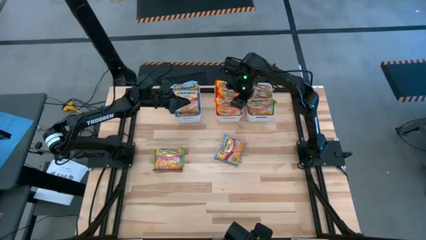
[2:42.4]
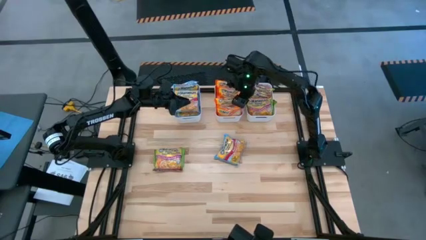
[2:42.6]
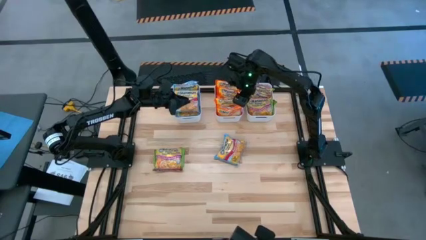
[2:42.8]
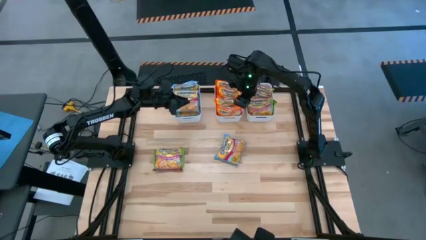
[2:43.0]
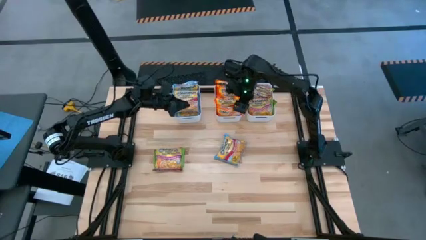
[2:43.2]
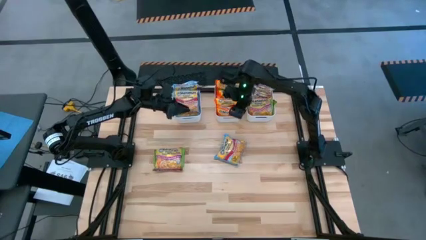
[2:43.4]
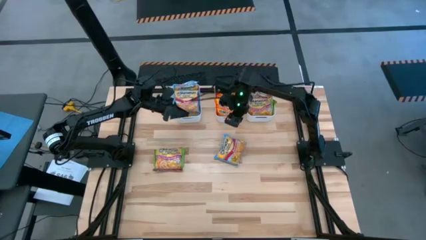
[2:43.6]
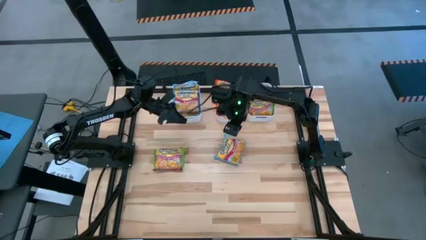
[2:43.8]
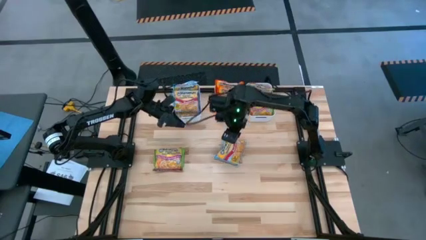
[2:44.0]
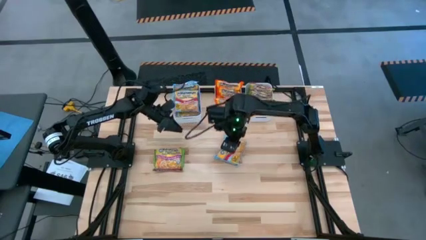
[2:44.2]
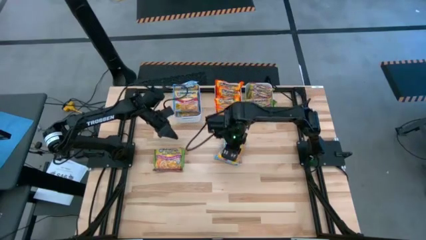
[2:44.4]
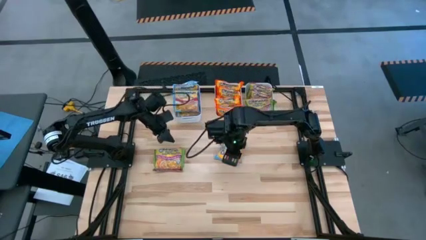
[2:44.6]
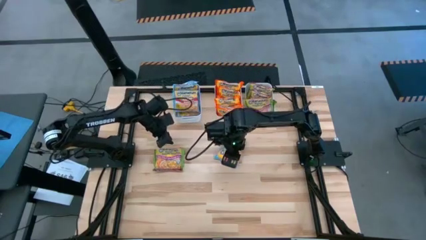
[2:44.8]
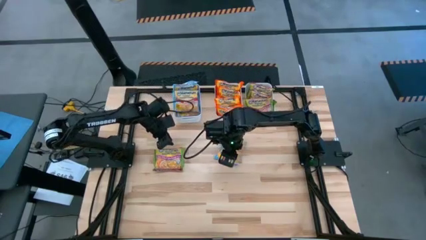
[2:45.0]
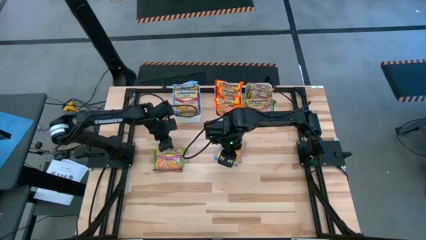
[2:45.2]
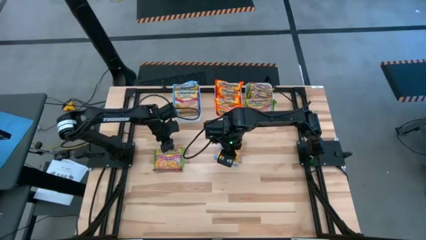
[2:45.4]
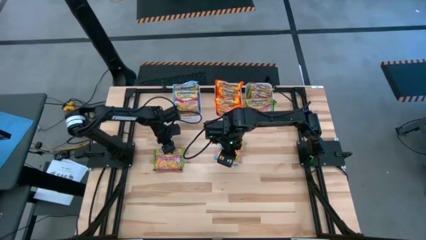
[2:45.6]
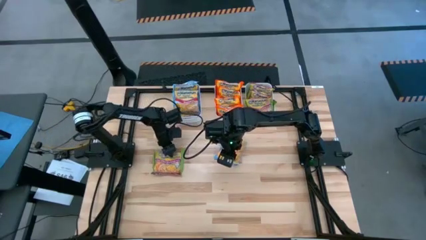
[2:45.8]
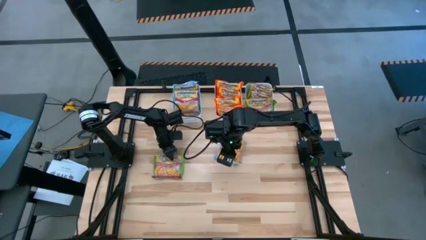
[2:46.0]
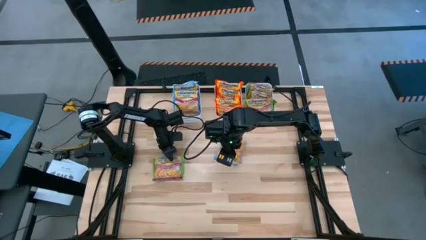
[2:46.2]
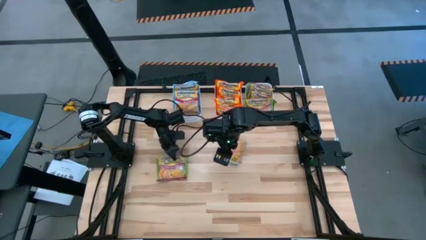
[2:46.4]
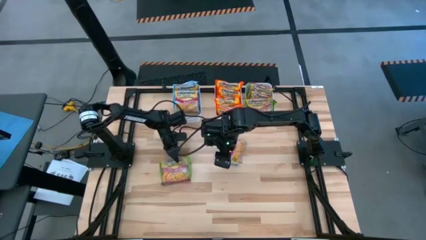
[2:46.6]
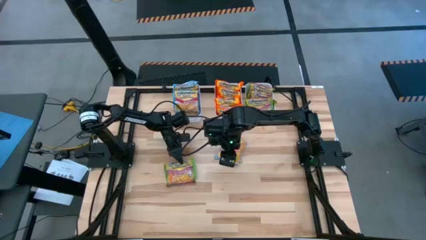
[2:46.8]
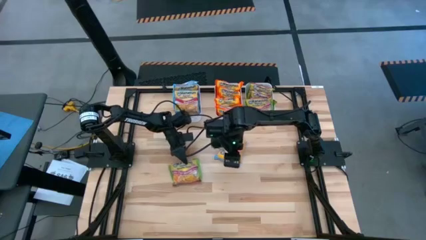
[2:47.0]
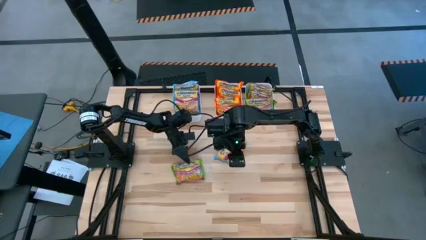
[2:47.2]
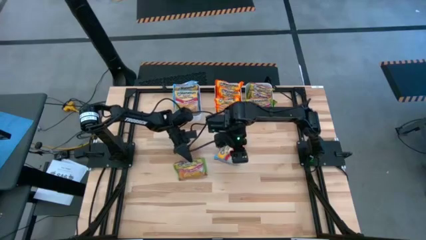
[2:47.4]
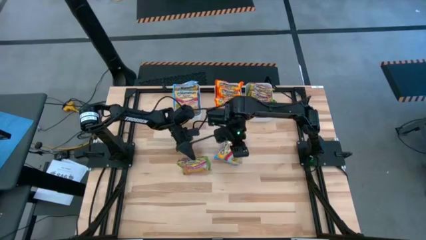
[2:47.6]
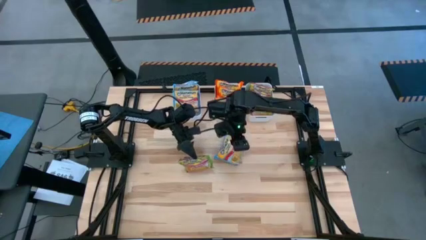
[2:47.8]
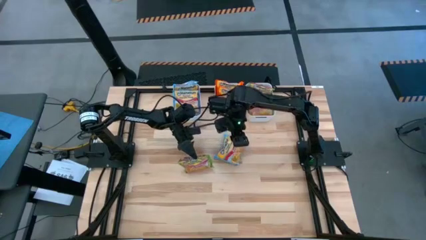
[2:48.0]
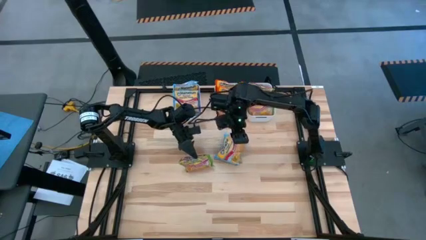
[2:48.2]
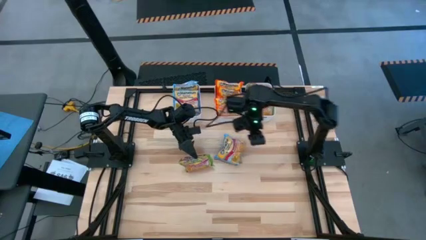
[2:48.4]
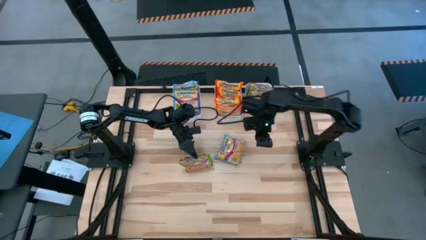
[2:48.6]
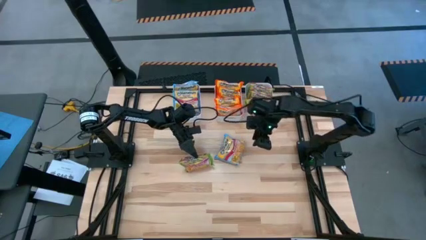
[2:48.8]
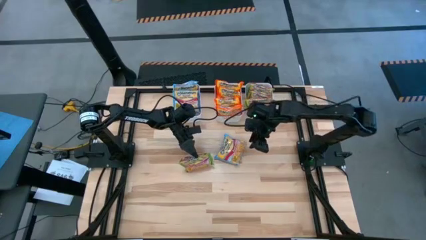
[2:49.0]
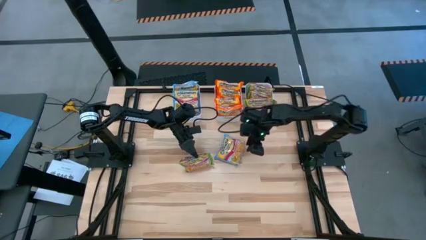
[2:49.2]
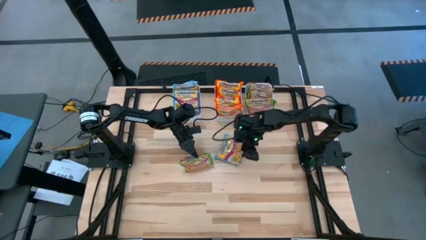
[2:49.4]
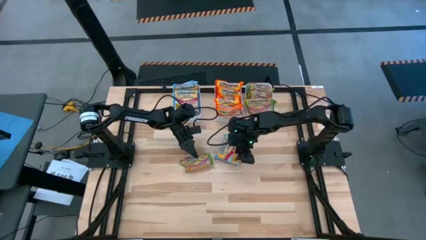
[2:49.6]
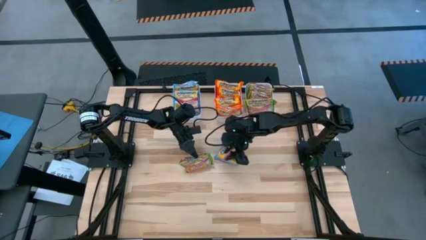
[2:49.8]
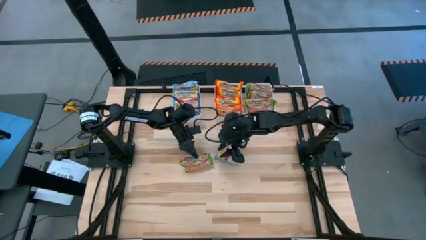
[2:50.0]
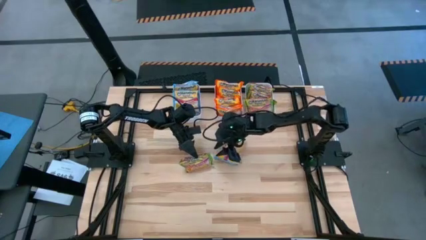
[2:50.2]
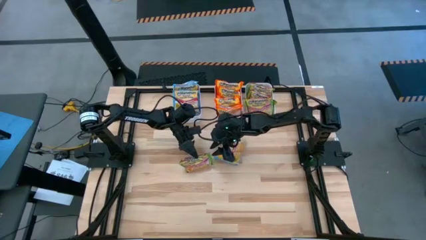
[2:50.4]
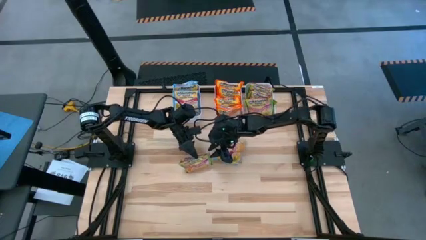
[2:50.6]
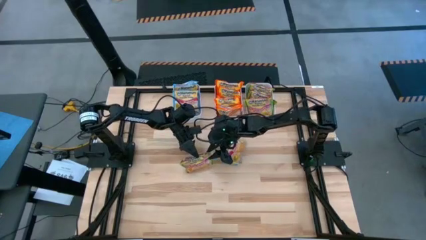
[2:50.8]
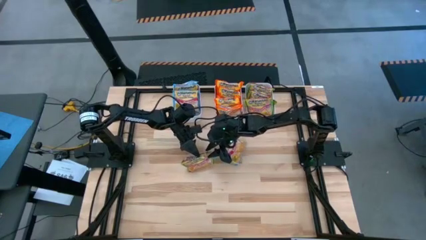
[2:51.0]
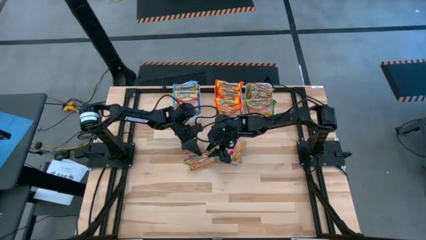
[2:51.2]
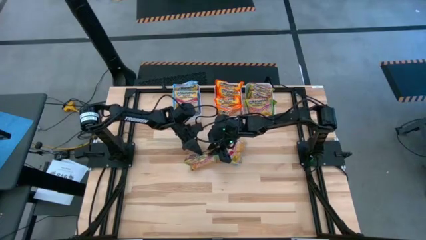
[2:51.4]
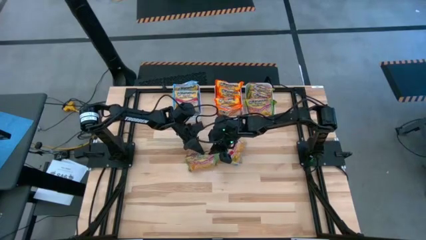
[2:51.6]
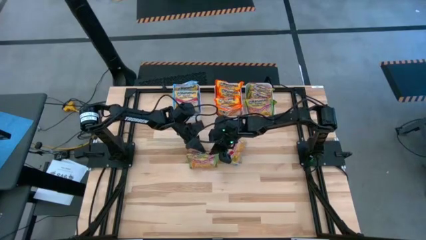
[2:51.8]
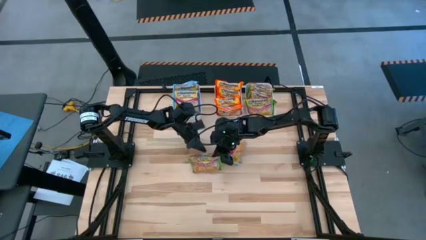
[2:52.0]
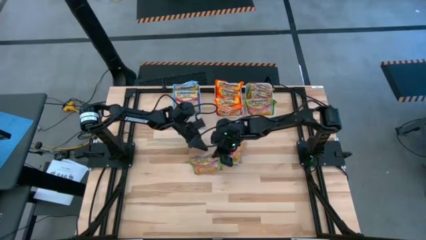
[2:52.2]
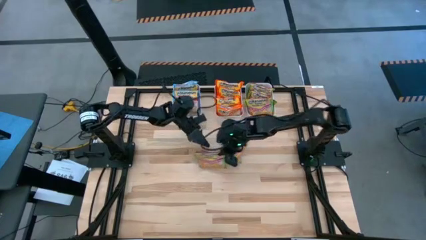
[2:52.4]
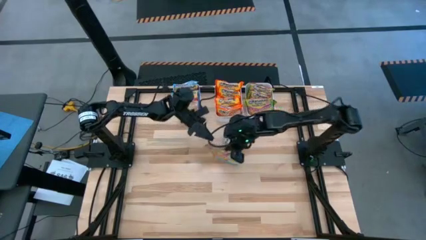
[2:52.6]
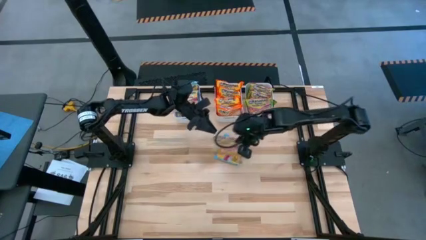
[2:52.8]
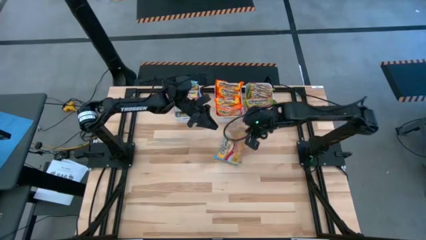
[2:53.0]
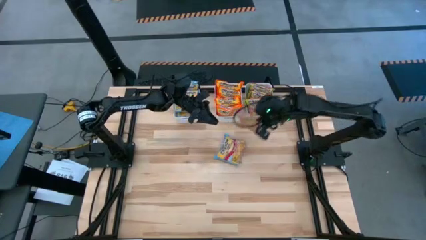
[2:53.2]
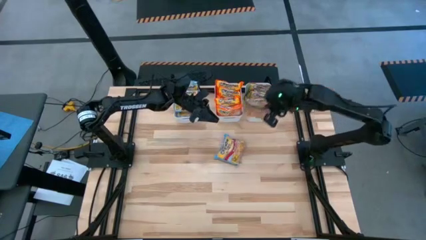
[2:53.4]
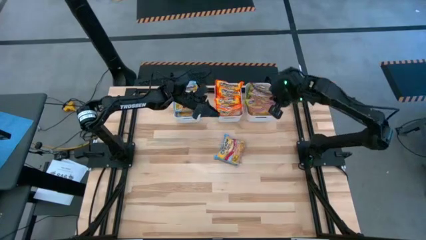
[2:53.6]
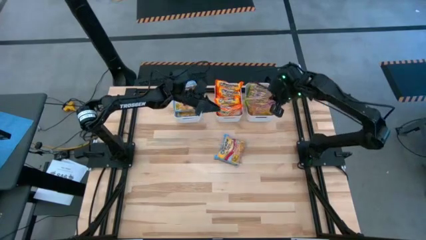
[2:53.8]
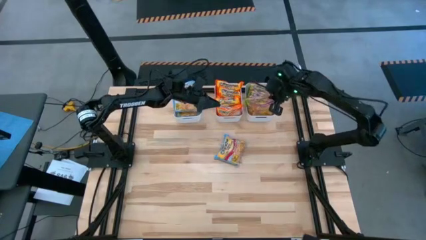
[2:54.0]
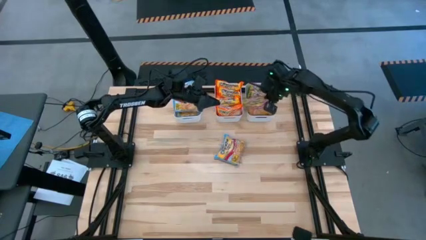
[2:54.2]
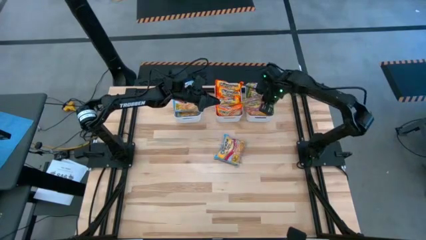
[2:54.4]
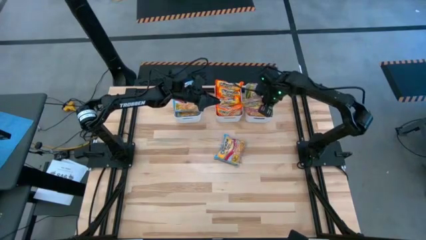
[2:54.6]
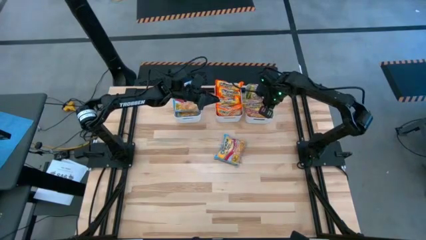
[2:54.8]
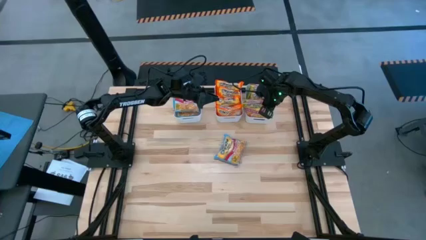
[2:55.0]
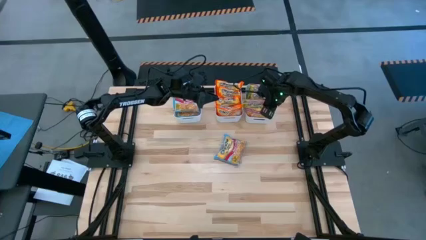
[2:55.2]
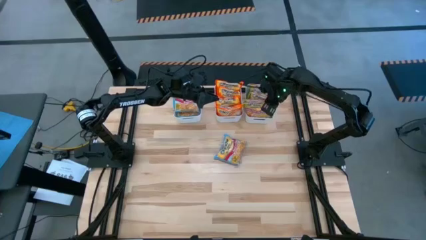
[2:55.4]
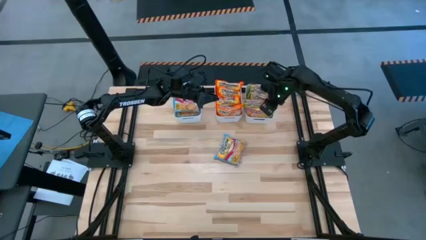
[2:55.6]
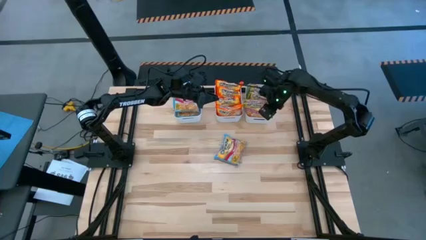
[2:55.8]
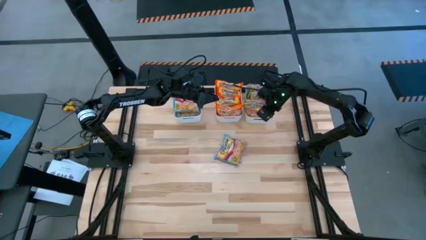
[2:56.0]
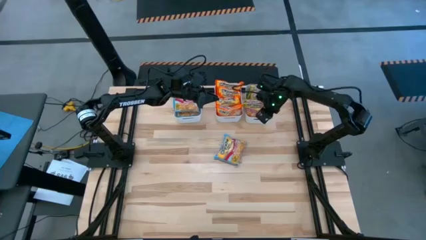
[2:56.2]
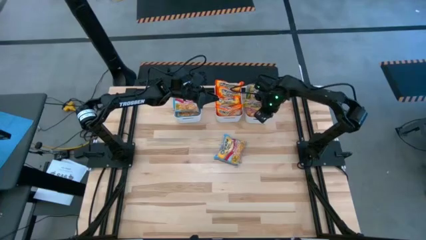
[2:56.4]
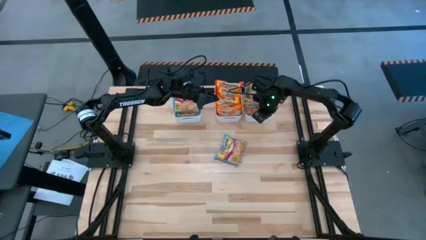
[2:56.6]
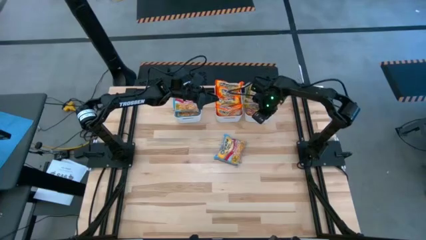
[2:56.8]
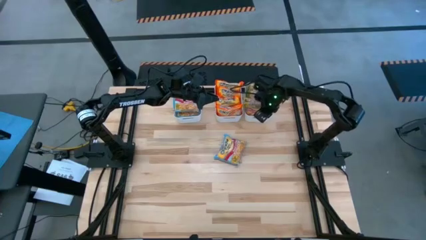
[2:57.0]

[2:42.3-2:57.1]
Task: Sort Maruchan noodles
Put the green noodle pack into the right white bin
